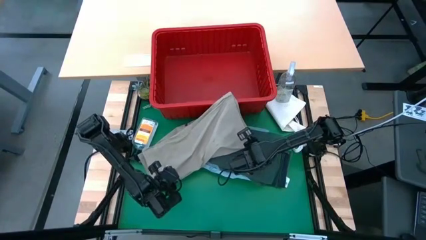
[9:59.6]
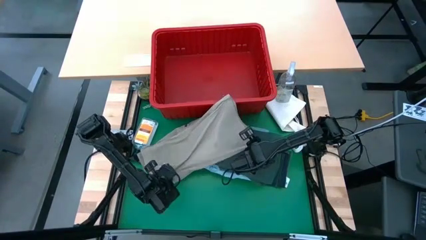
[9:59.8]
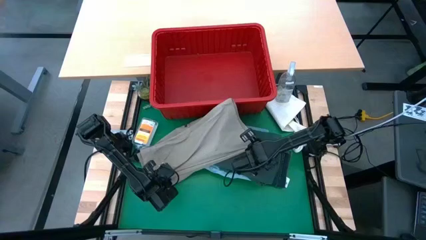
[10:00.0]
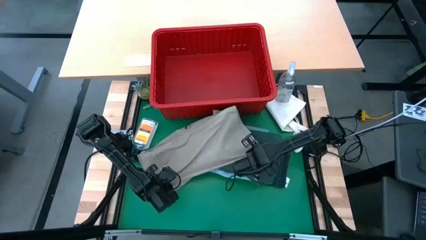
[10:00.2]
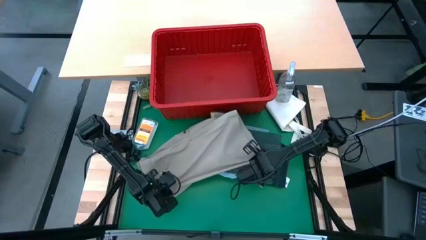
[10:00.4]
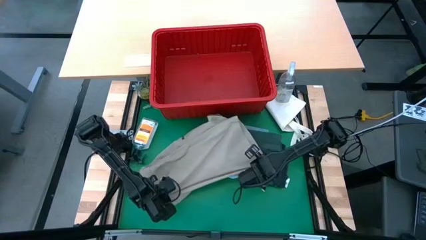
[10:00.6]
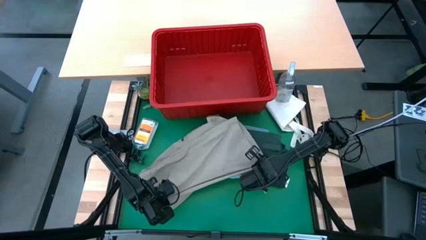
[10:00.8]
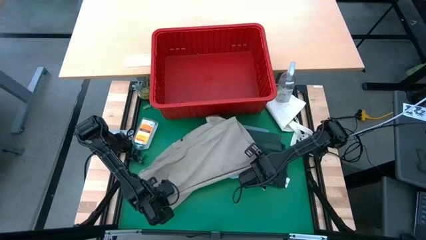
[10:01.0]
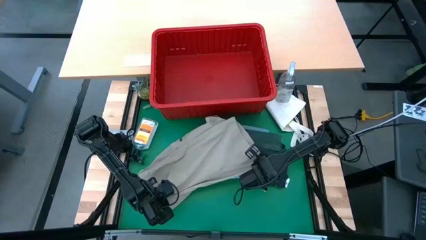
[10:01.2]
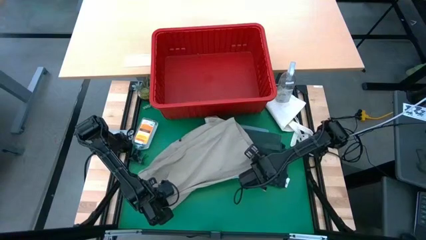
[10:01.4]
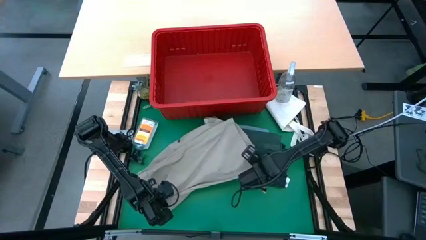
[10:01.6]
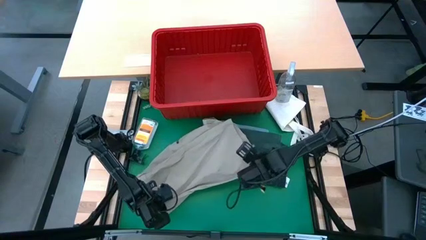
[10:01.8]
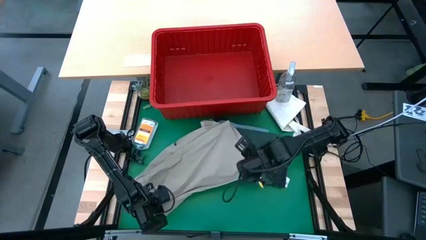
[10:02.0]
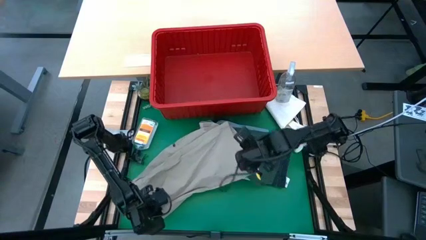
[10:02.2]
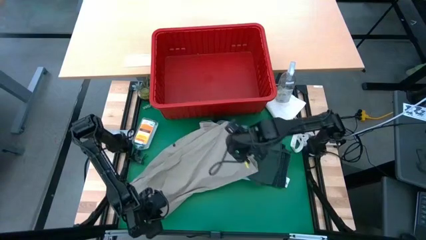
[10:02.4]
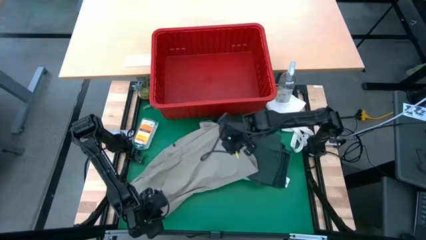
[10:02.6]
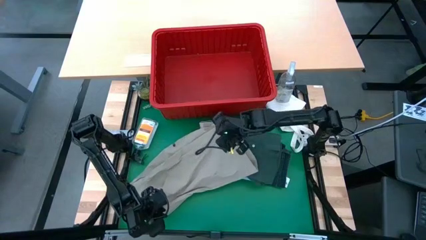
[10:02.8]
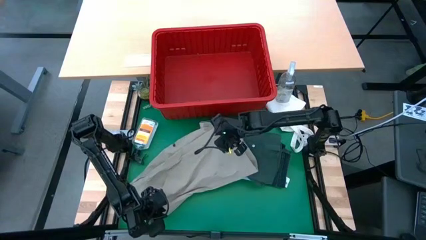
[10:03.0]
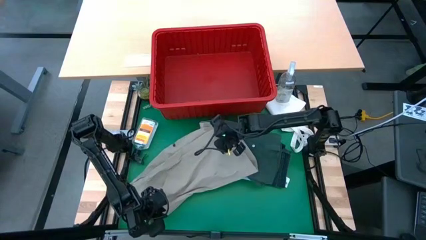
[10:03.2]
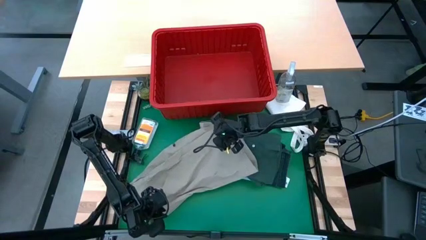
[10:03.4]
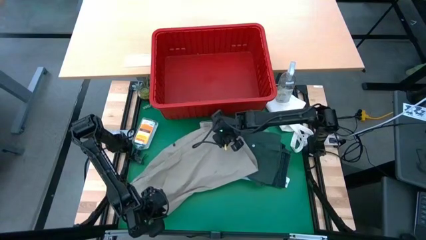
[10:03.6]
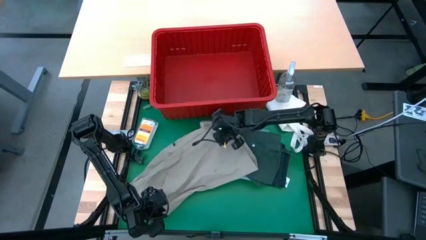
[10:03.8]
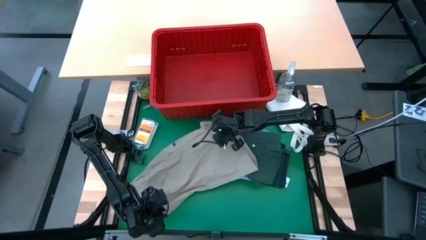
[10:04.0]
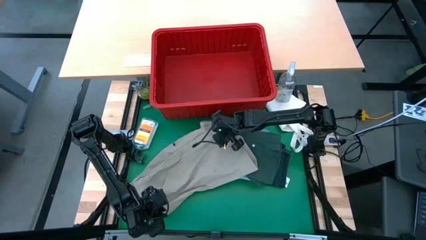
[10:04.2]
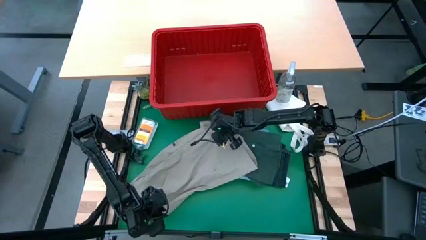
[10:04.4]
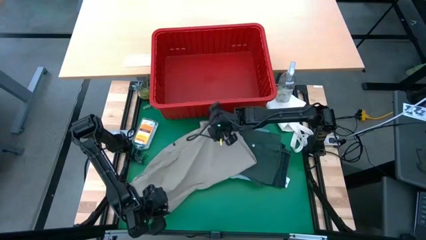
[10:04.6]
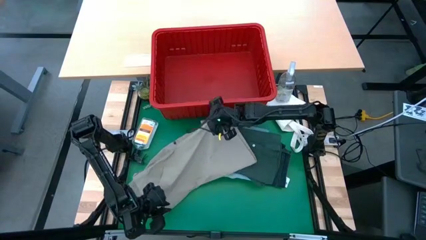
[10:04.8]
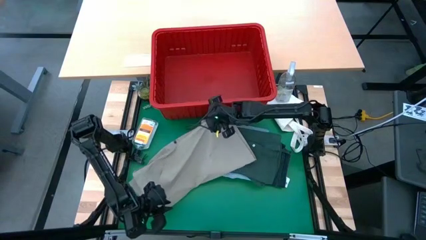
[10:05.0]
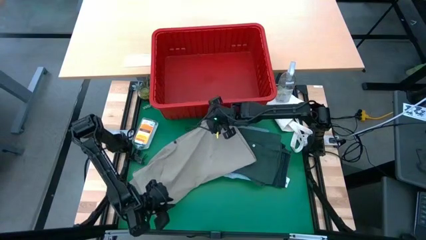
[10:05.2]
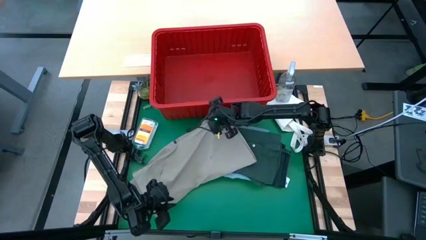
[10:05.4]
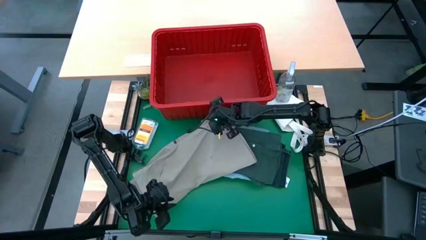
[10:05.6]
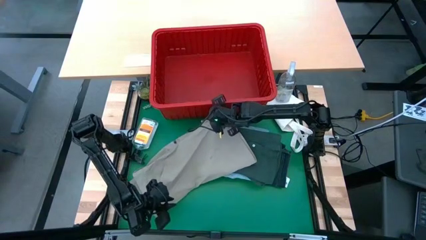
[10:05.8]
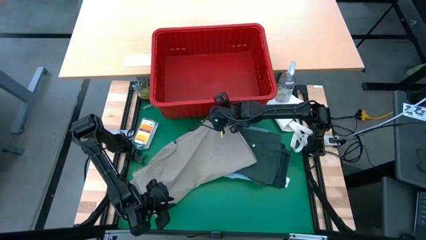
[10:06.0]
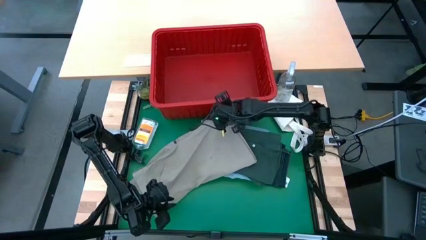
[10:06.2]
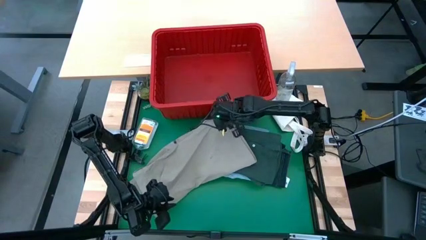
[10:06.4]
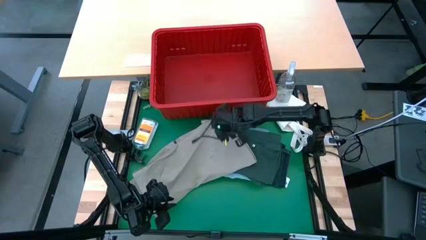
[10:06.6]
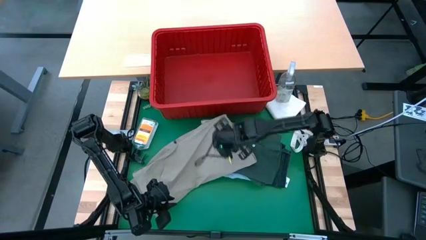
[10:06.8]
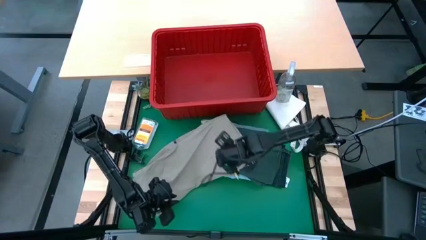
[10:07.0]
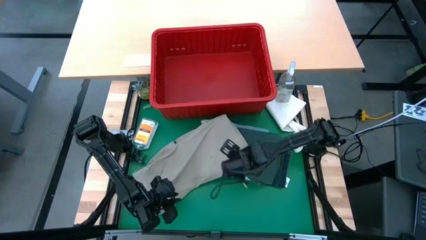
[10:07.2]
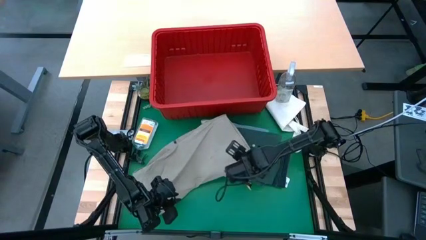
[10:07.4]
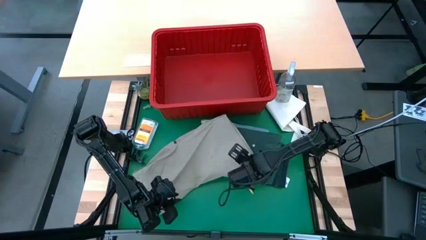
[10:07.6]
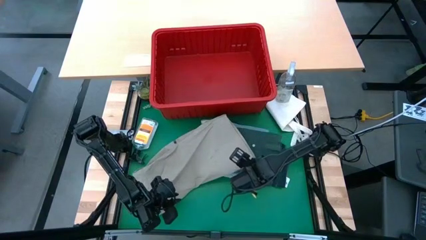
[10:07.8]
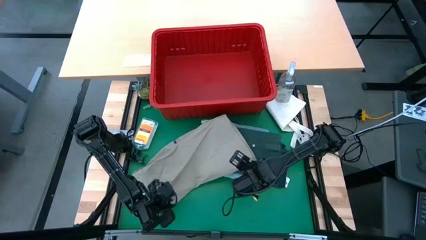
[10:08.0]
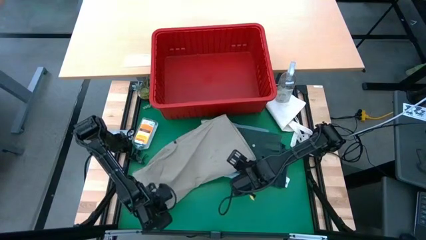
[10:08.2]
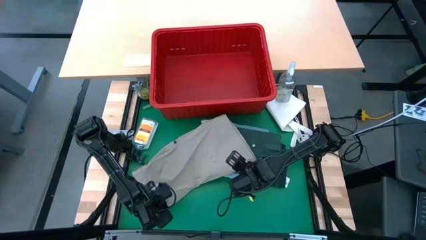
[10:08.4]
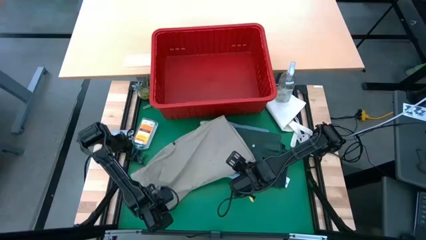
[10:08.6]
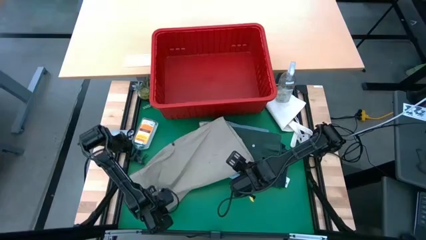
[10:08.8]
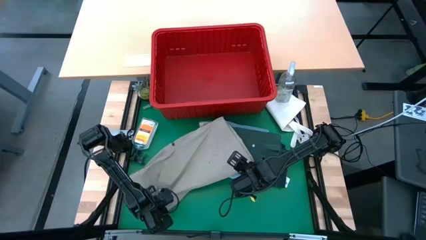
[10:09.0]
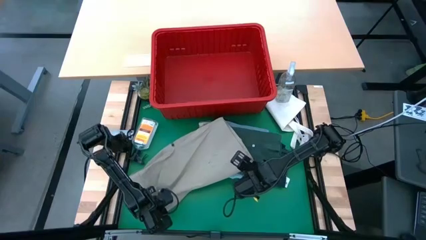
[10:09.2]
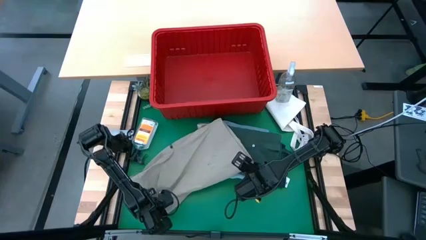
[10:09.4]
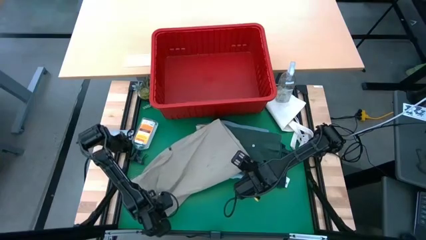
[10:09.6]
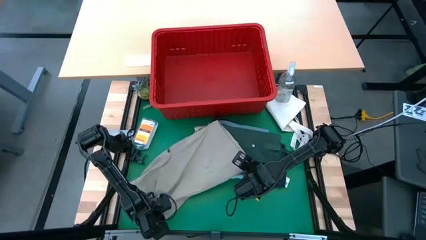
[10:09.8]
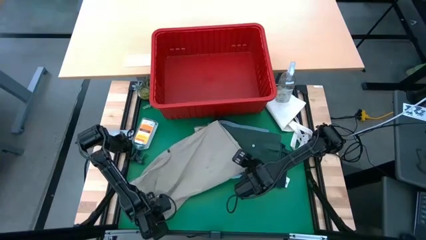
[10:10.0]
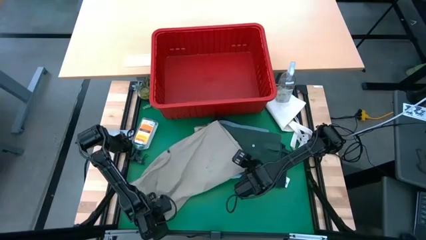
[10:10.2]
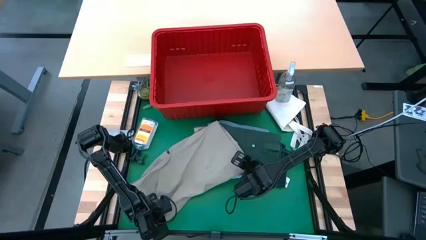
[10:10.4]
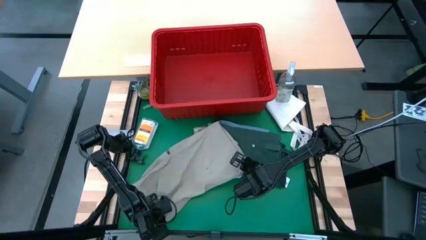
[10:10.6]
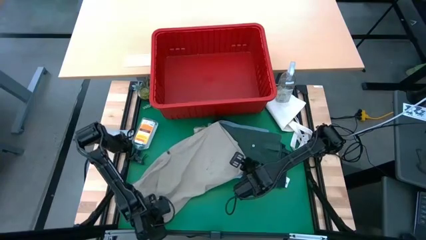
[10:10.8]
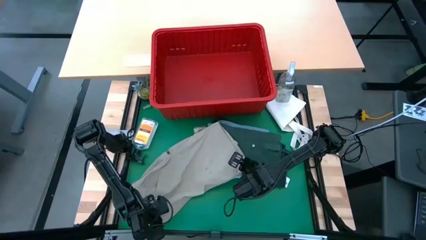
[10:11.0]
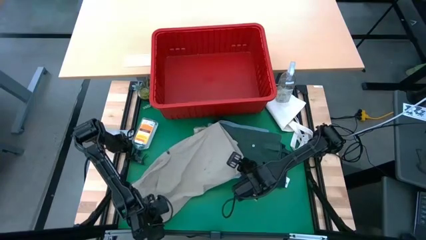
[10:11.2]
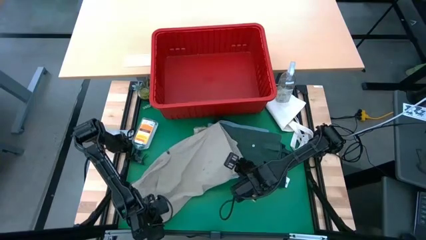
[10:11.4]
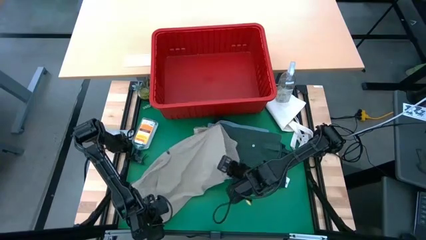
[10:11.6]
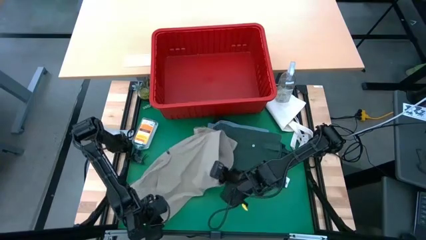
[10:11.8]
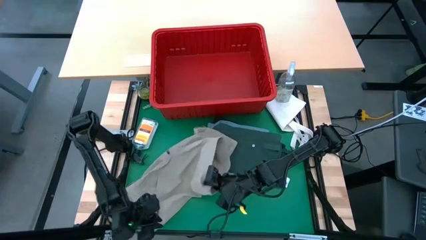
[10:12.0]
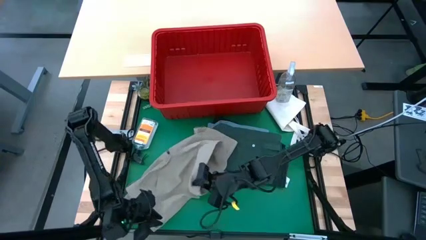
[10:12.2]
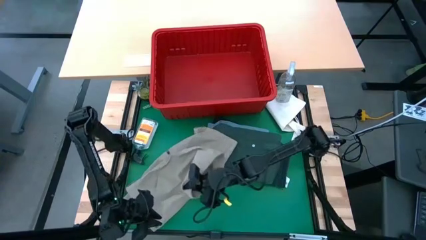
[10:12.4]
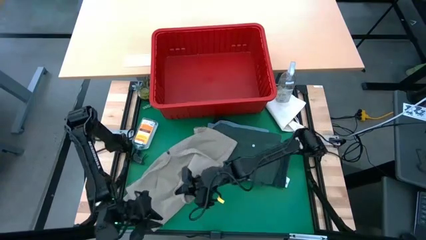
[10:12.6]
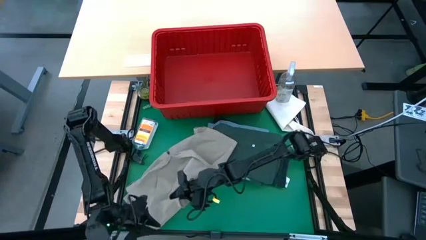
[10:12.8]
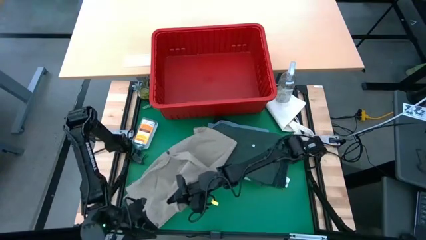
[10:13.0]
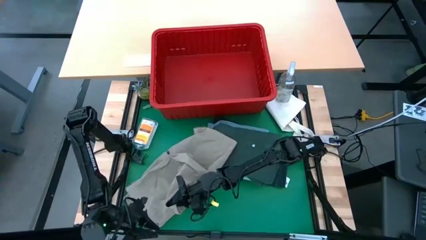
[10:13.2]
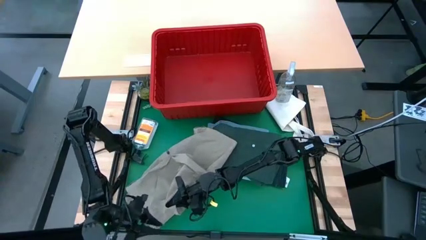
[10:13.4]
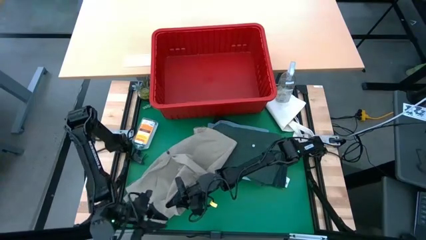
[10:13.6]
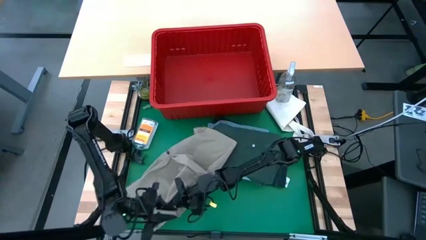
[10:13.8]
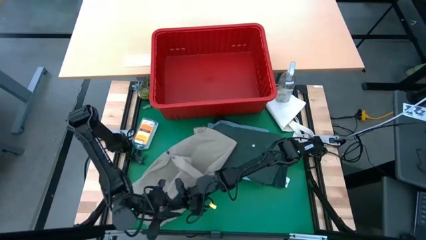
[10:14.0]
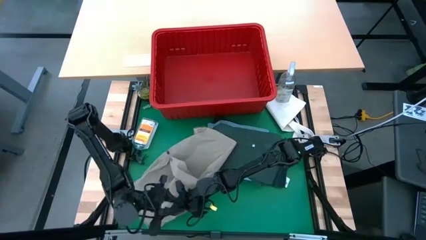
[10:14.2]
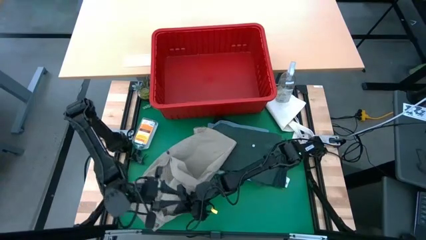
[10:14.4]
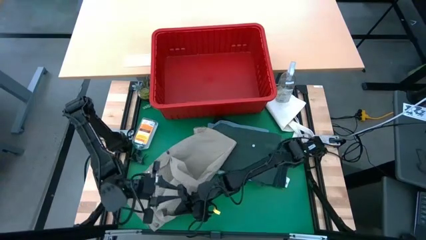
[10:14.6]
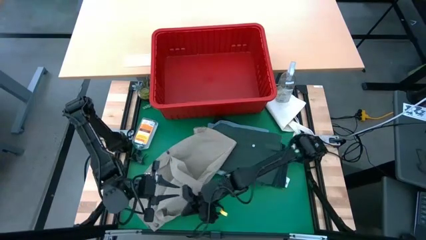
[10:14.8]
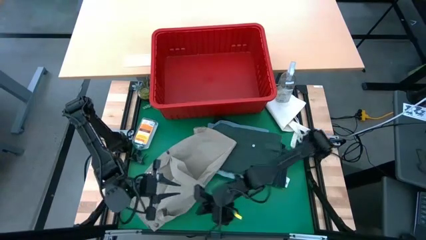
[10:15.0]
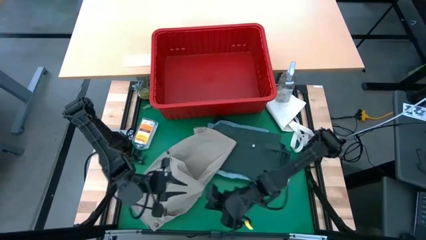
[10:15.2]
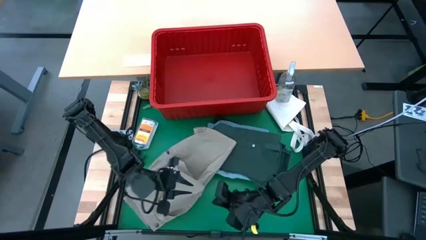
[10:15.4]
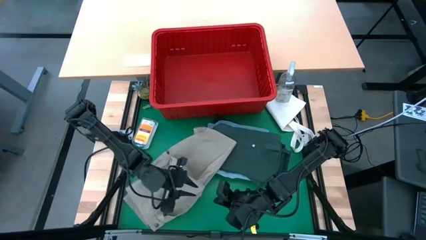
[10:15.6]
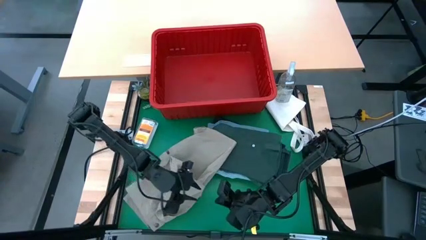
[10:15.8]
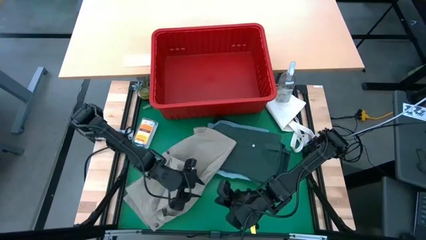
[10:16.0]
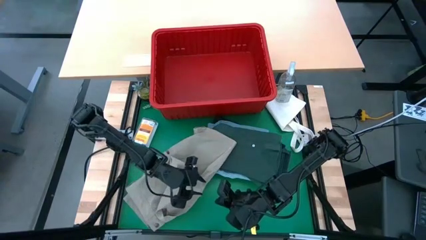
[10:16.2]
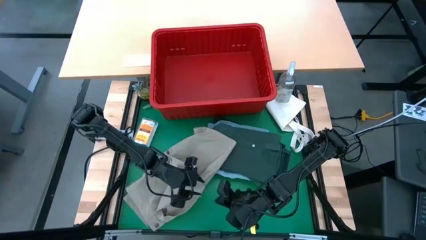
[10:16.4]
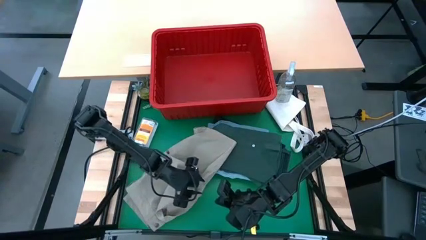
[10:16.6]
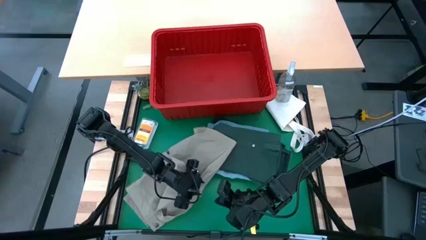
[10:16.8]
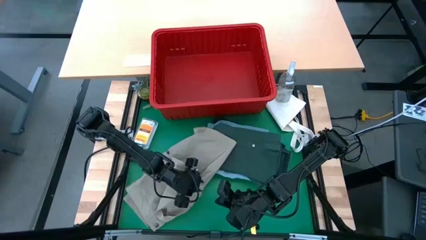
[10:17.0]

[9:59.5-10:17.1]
Task: Fold laundry
Fold the beige shorts
